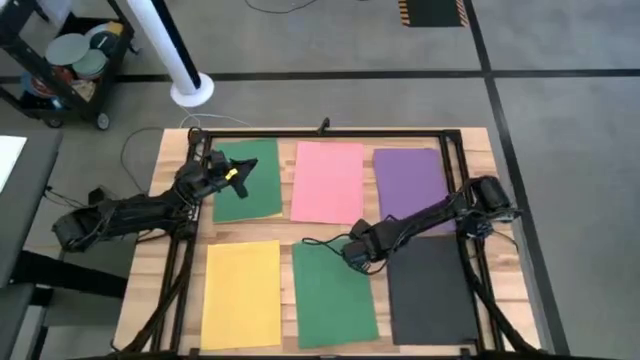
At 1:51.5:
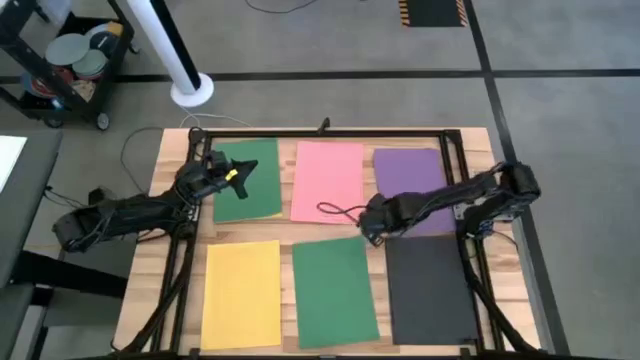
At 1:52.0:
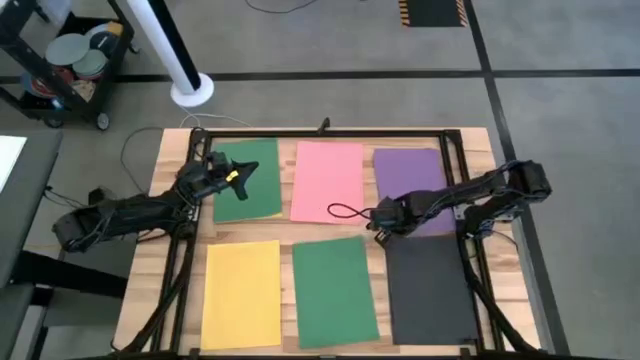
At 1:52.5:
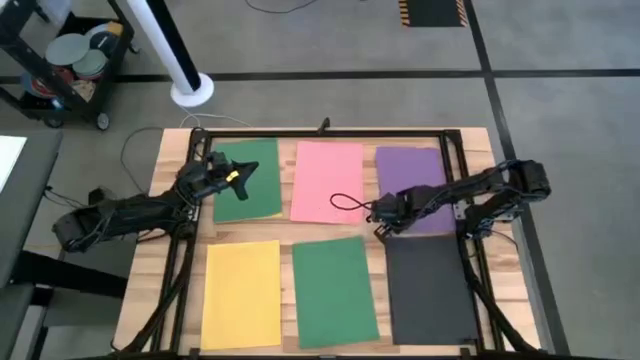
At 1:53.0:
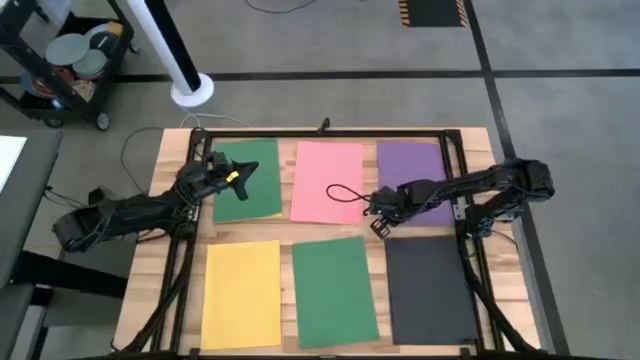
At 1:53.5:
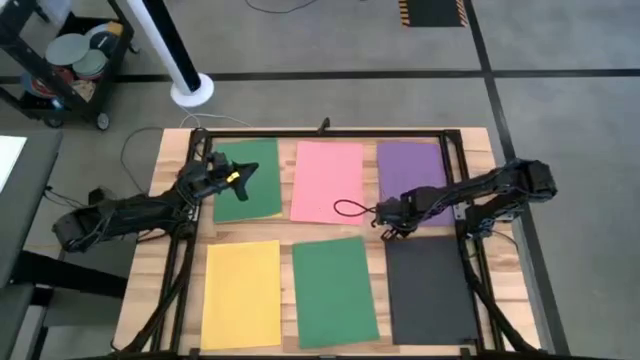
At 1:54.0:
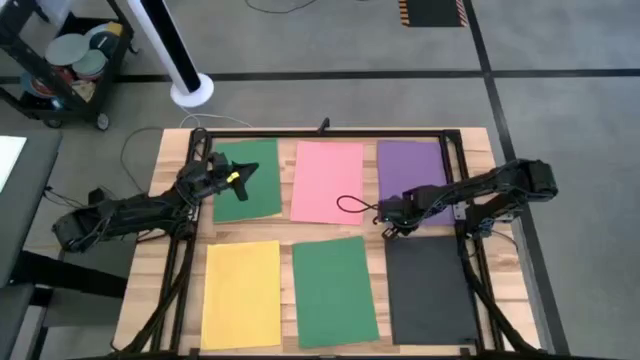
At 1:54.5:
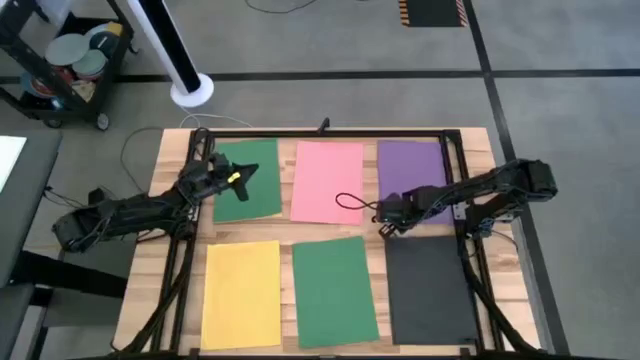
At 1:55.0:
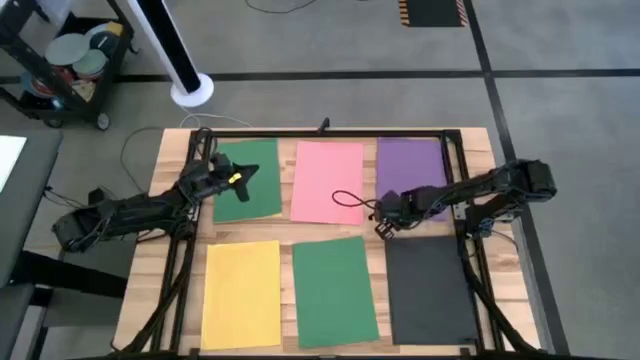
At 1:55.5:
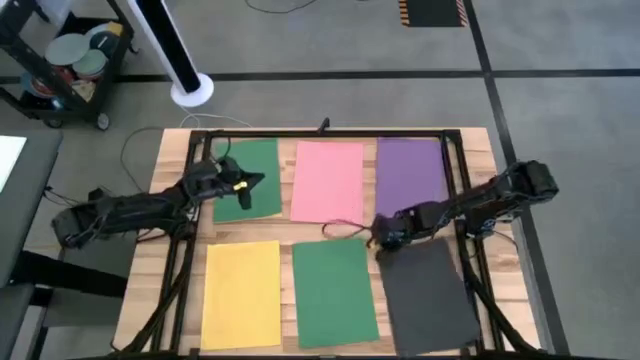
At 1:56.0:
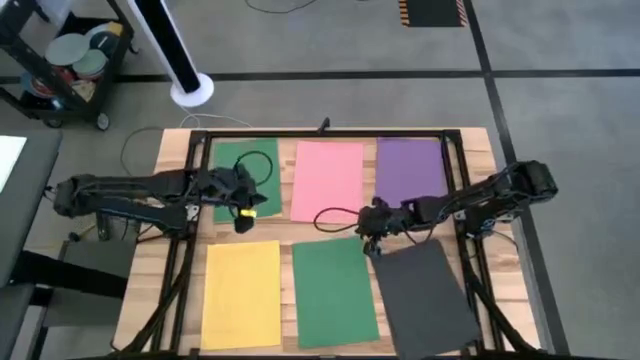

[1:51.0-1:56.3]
Task: Organize paper
Adjust the stacked purple paper

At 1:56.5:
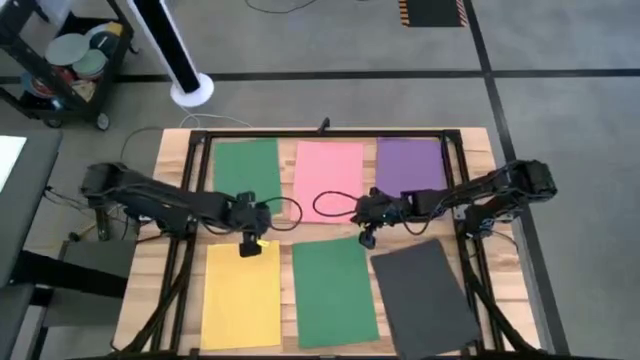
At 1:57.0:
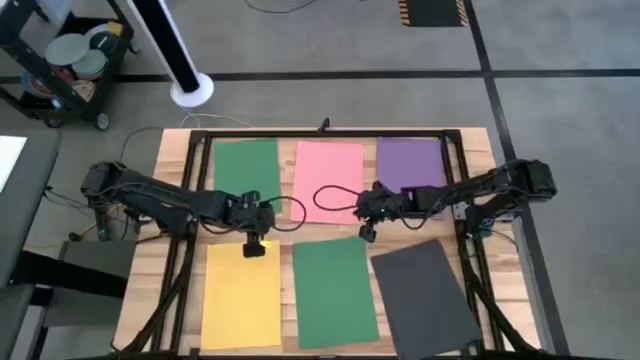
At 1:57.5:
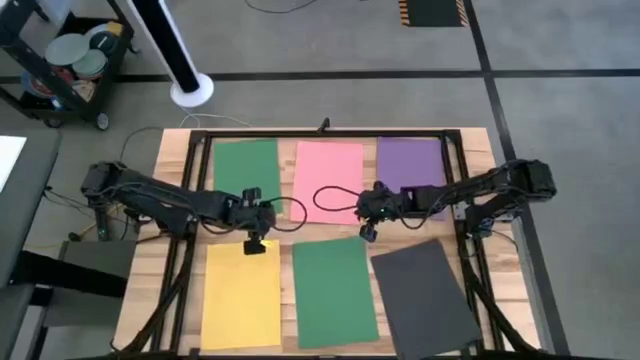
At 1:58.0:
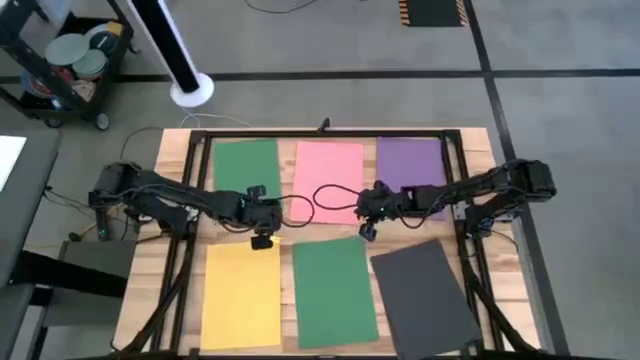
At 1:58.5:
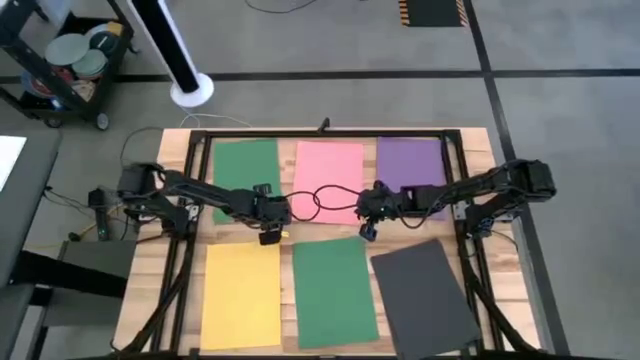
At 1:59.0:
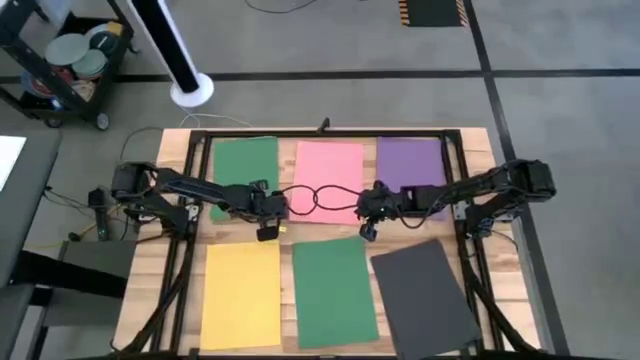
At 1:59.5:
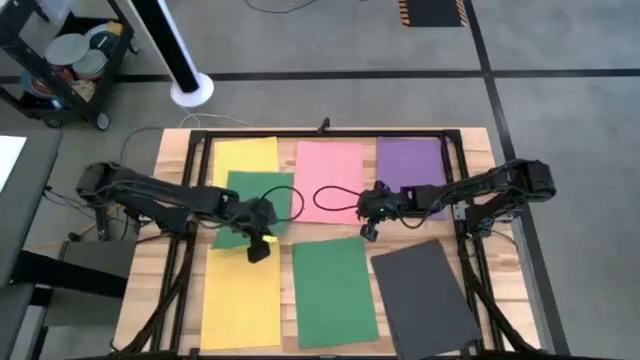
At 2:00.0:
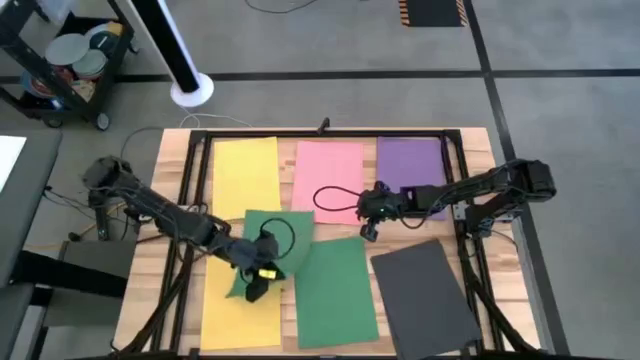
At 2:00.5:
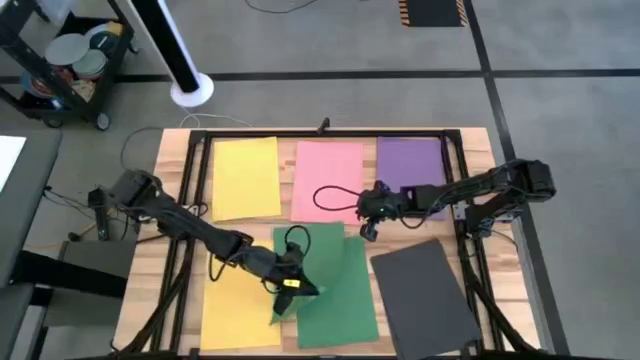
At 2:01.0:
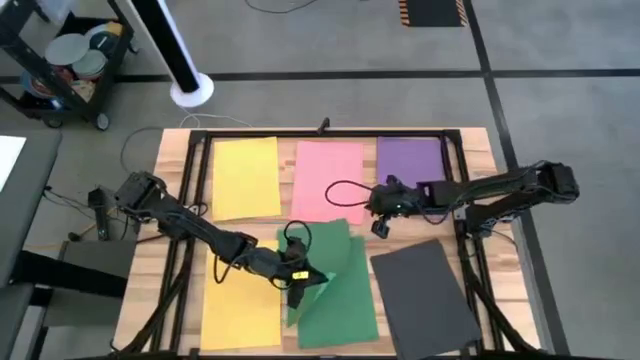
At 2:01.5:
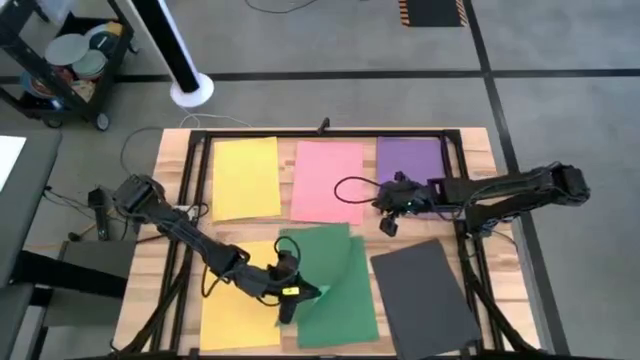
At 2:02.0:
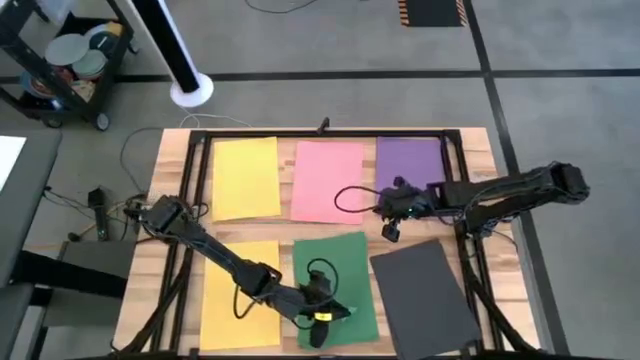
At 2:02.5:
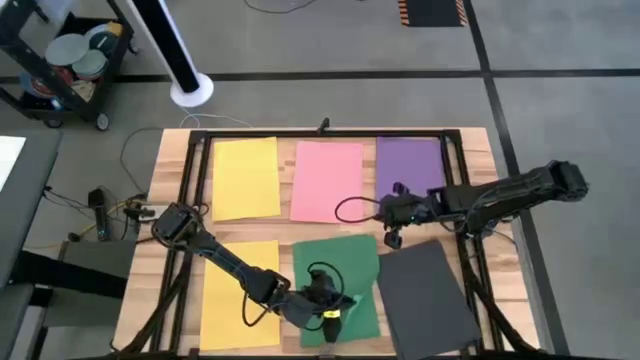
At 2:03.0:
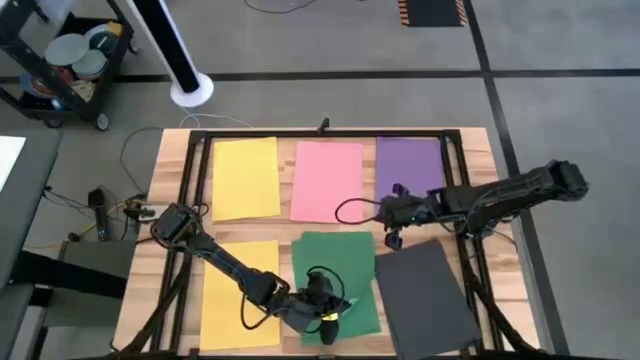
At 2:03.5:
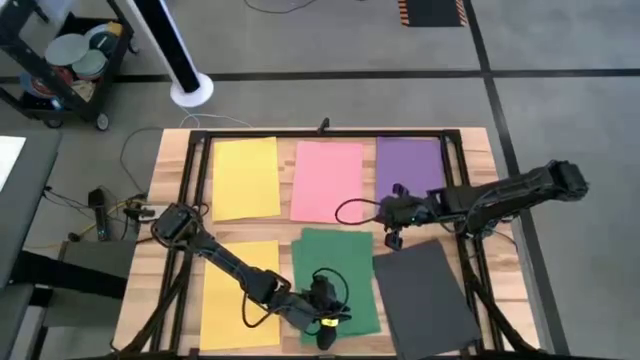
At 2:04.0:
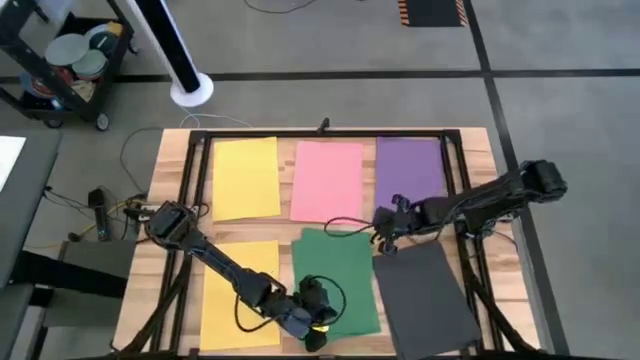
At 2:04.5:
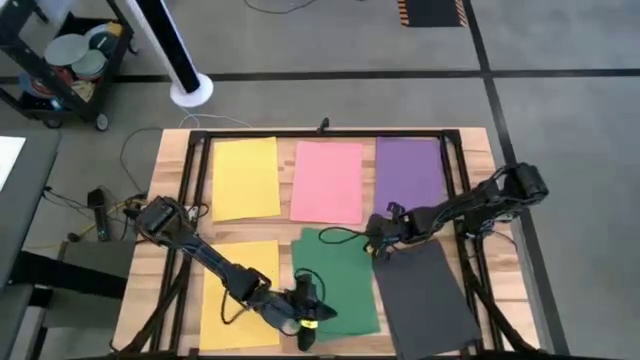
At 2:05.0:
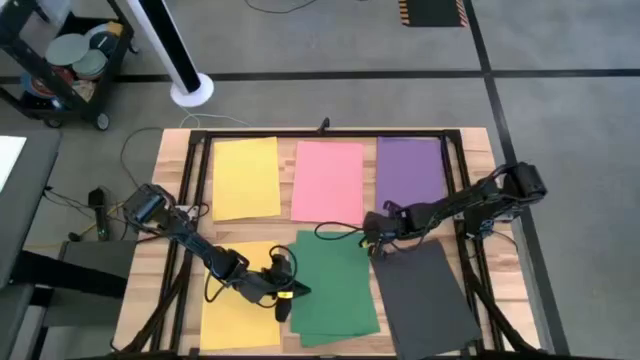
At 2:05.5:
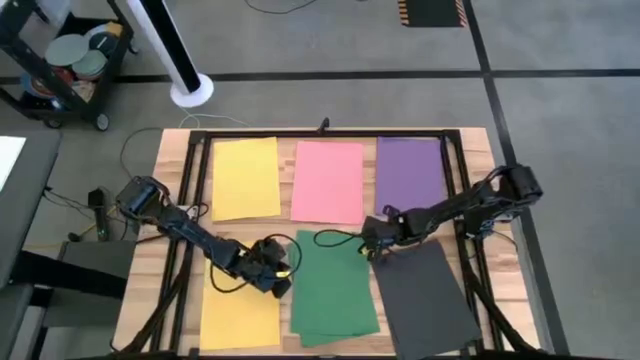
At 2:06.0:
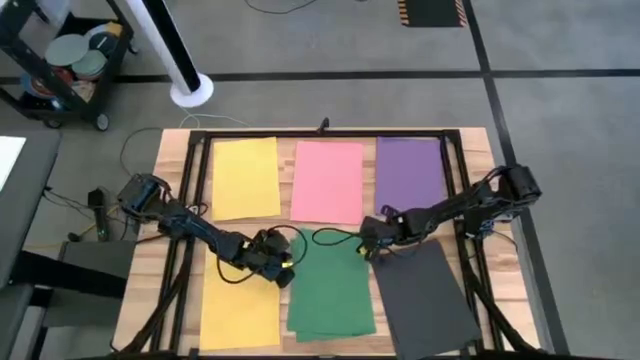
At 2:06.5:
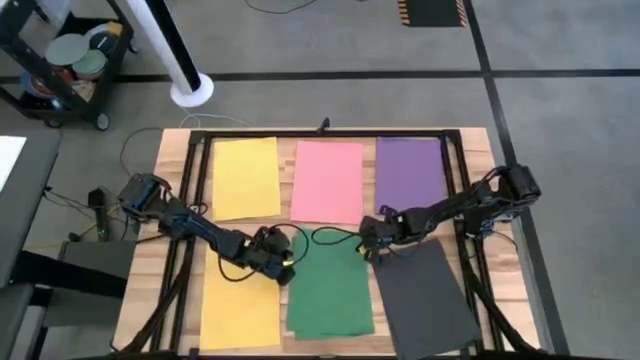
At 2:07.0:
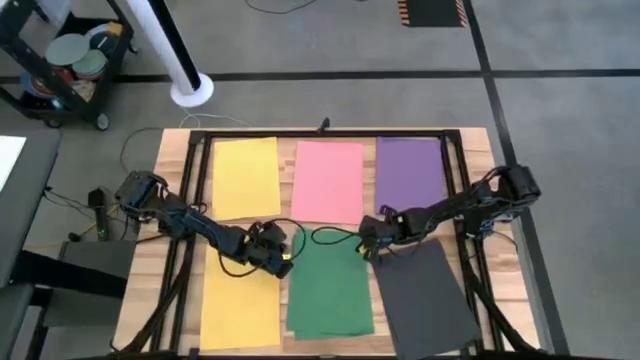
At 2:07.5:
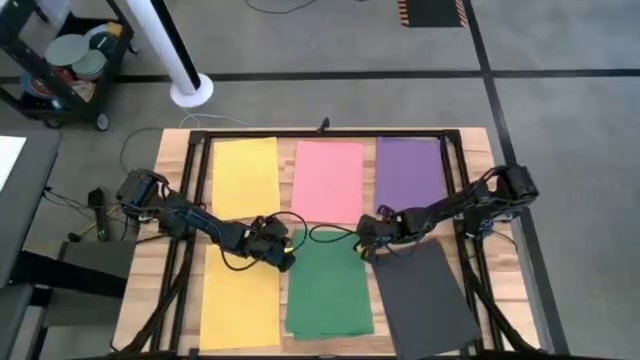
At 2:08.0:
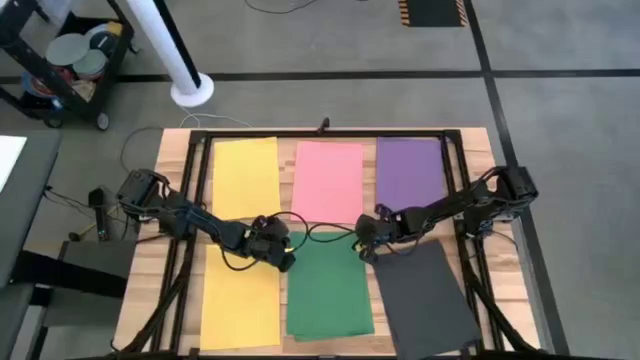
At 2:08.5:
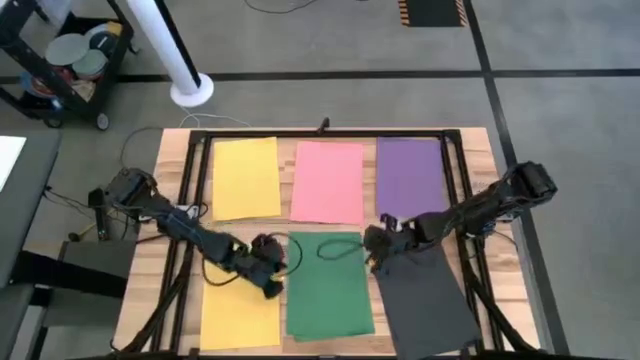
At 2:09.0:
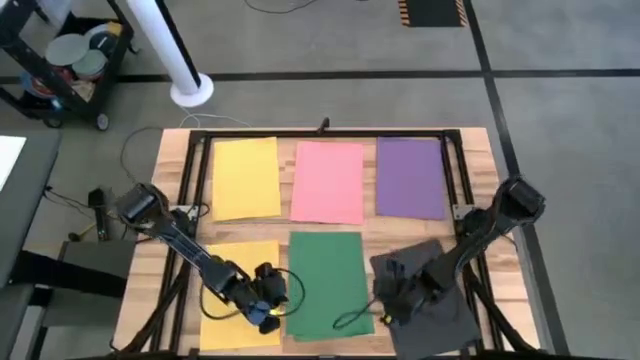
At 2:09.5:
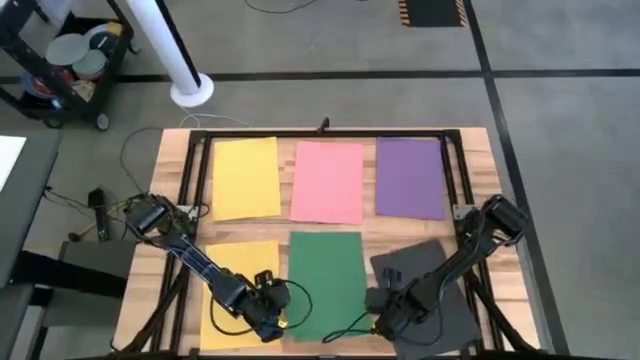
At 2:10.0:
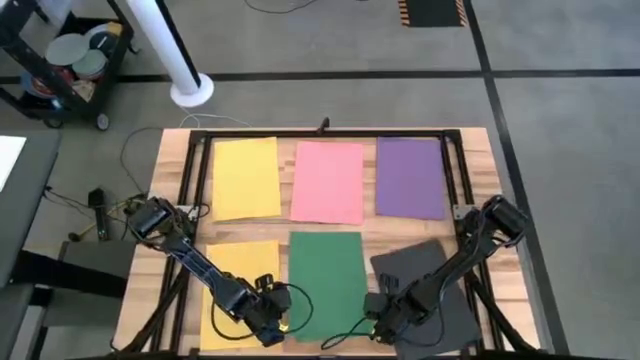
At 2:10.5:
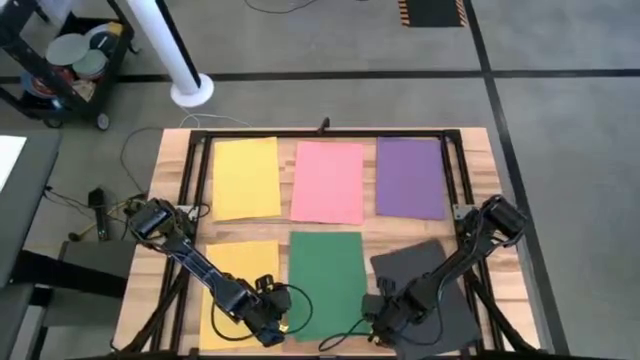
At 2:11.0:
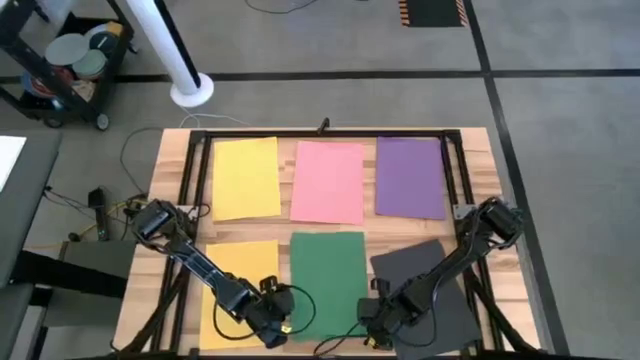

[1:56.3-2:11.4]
Stack top the green paper on top of the green paper
